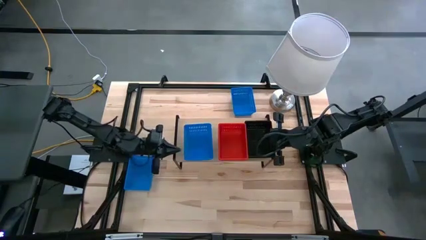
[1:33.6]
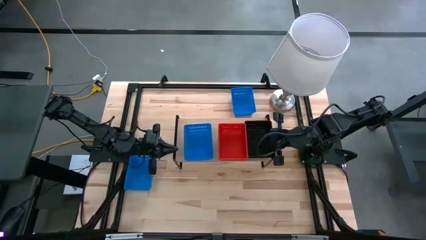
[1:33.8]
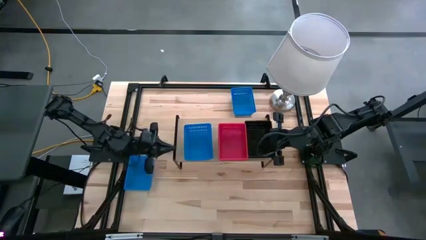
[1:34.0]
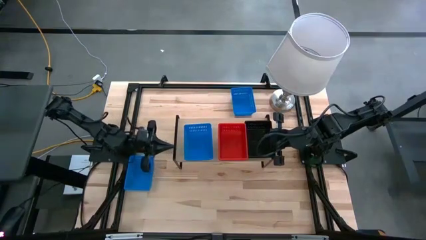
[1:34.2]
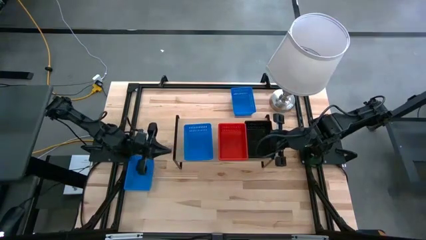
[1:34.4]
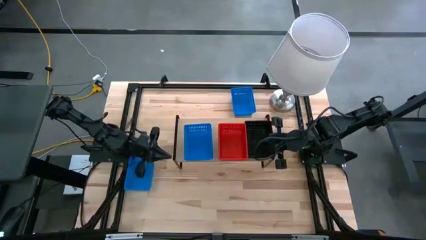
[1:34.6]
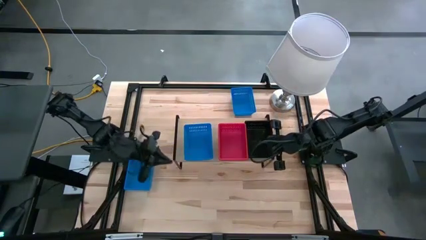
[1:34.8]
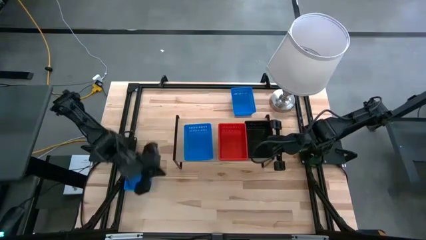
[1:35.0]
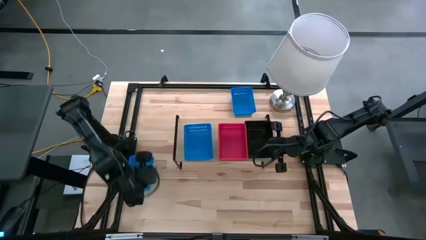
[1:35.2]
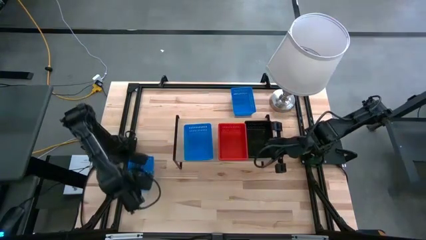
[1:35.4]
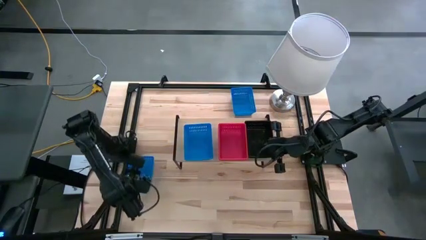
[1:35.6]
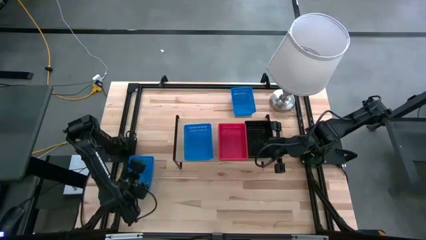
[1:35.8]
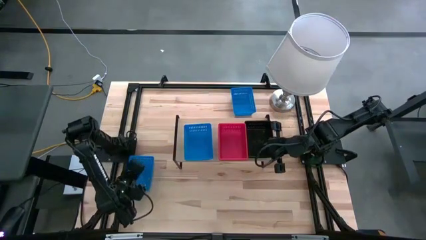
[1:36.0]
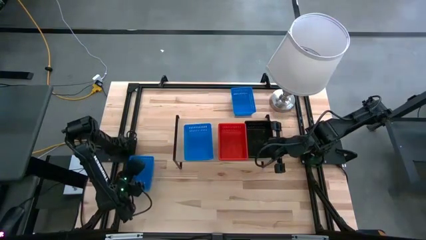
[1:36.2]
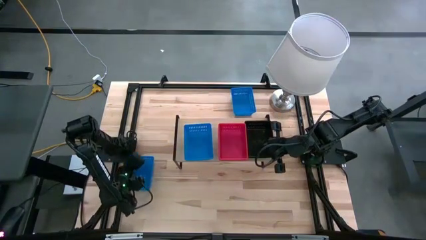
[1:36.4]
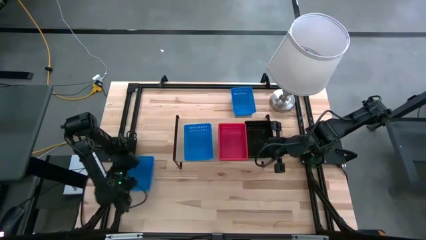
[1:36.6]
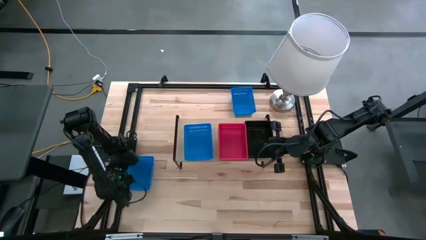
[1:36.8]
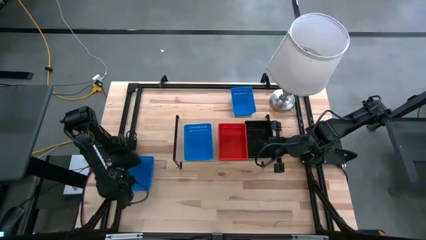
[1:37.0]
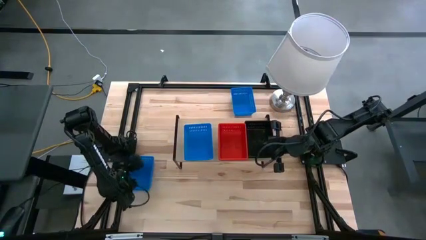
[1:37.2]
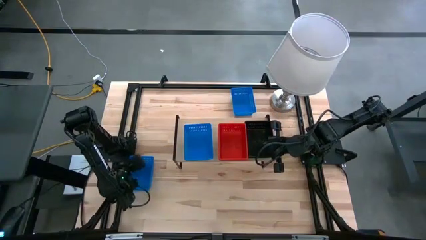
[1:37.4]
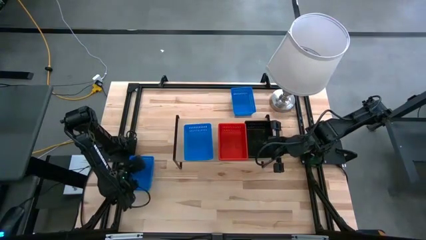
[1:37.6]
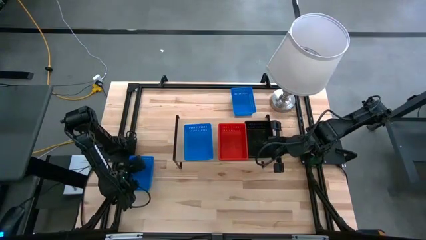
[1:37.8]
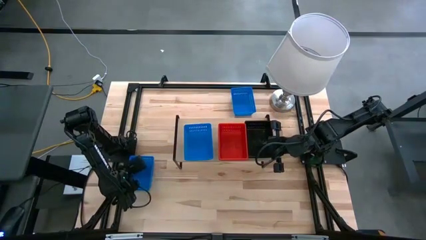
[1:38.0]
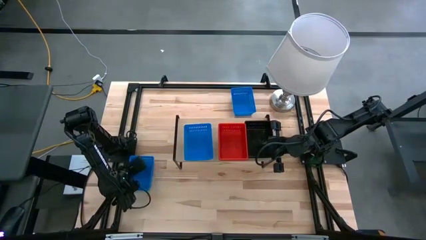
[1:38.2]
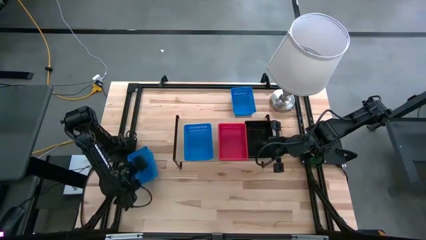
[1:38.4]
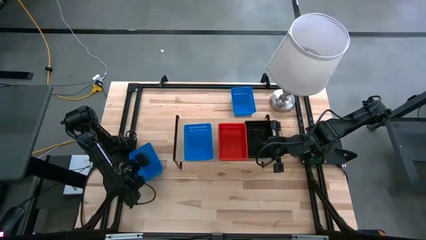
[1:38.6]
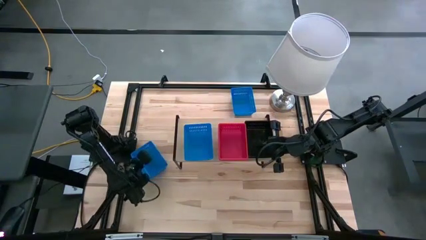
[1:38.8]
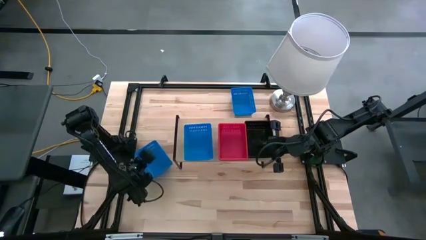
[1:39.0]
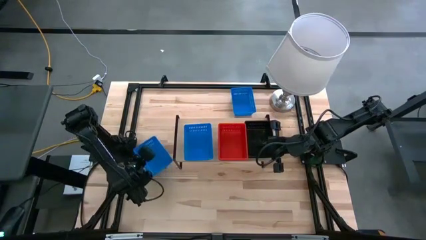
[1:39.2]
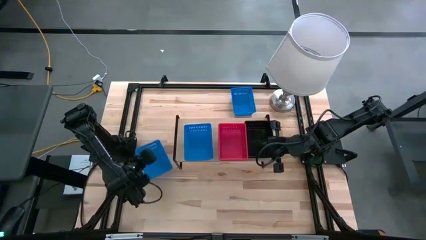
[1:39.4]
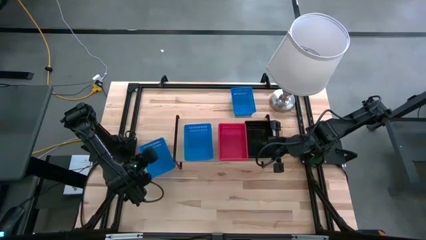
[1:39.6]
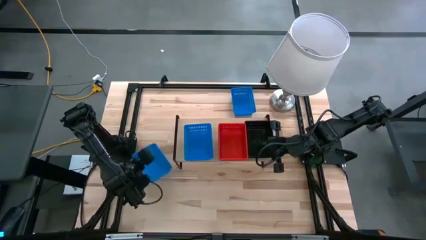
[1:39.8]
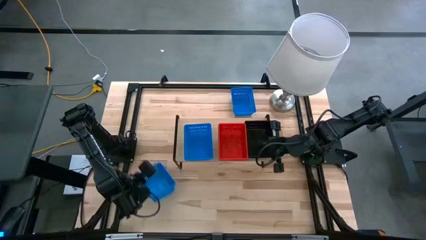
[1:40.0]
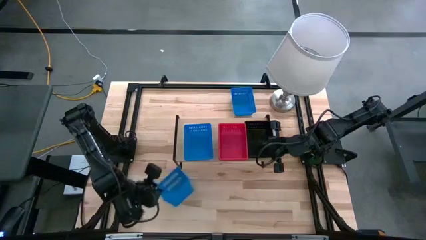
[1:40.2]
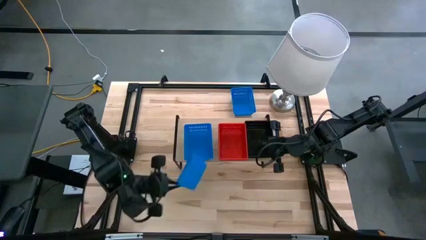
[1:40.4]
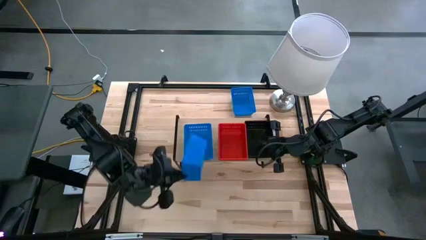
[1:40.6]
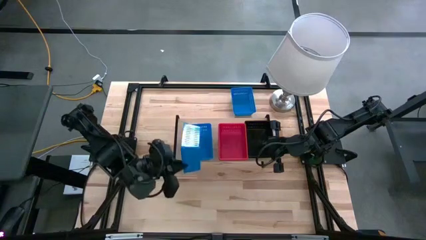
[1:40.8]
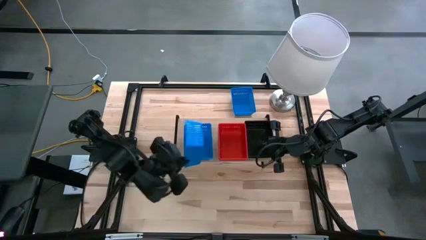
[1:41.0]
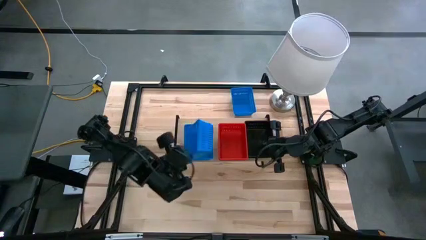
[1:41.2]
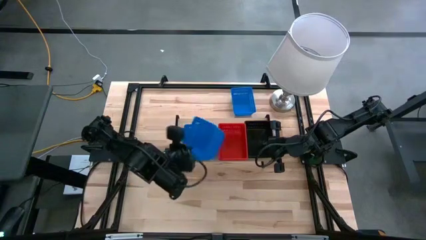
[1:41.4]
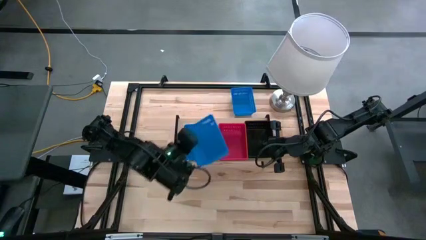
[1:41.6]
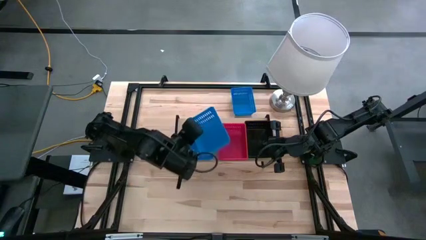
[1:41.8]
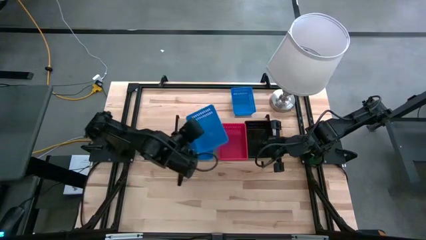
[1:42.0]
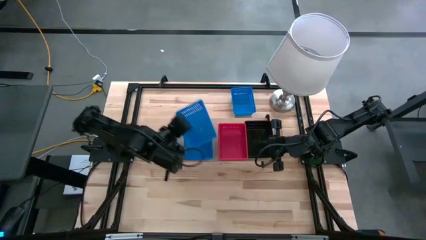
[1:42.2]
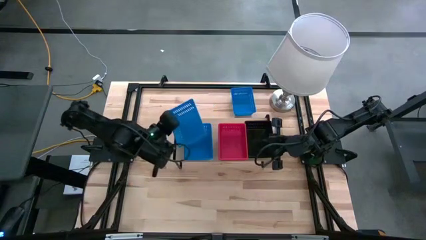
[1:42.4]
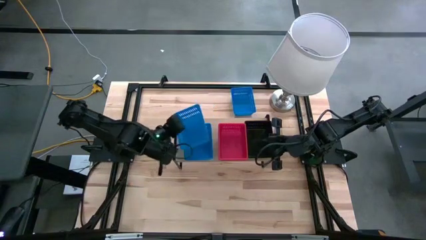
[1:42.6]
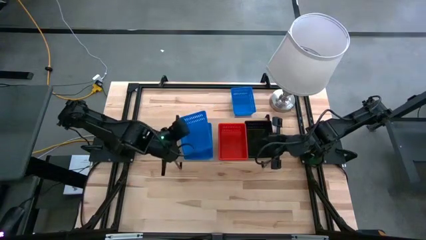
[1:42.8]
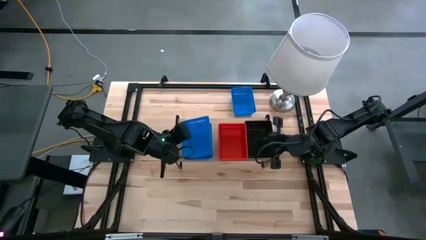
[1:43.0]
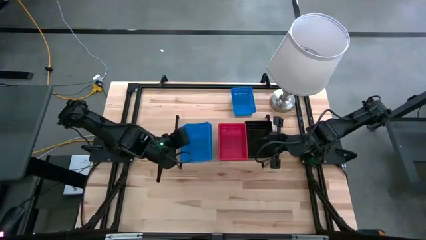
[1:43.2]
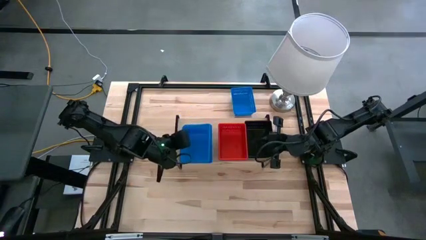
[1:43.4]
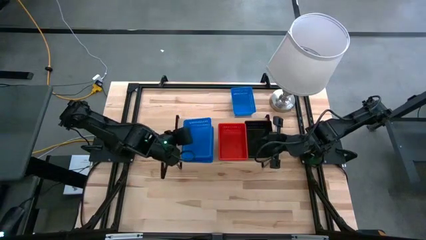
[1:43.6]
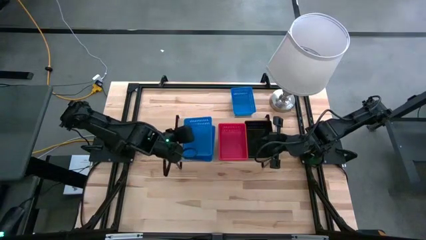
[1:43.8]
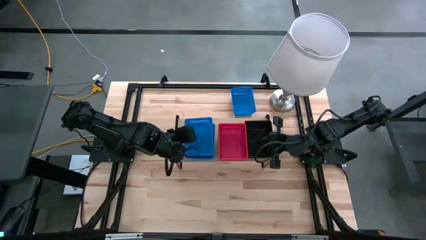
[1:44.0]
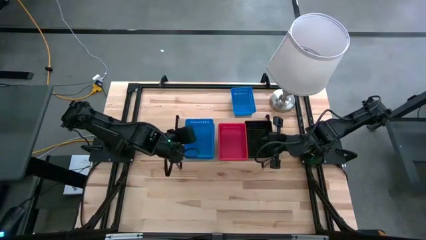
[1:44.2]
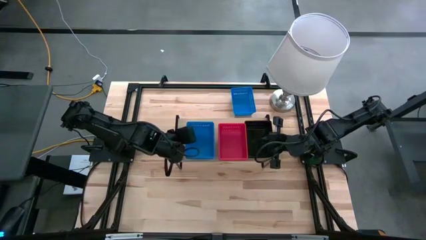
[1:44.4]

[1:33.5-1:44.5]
Task: Stack baskets on shelf by color
Stack the left blue bin on the blue bin on the shelf

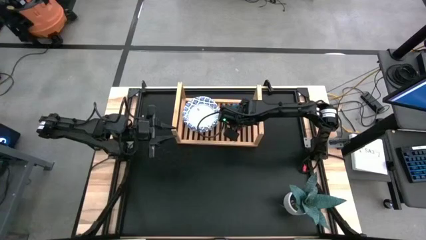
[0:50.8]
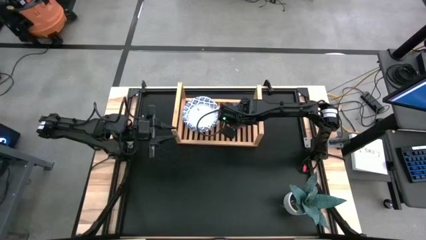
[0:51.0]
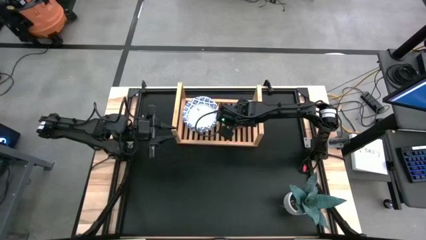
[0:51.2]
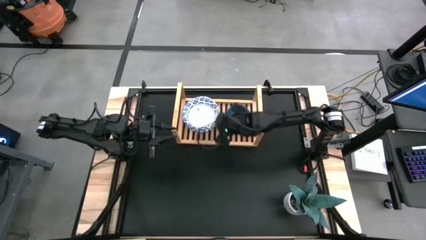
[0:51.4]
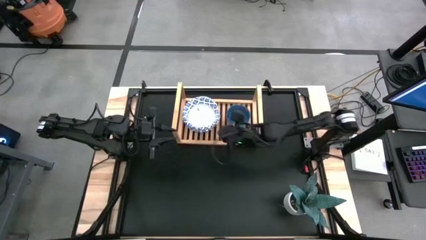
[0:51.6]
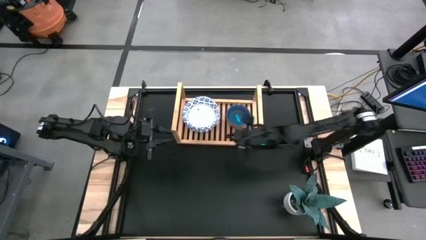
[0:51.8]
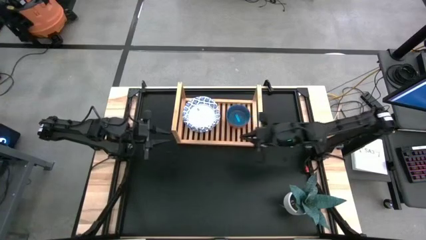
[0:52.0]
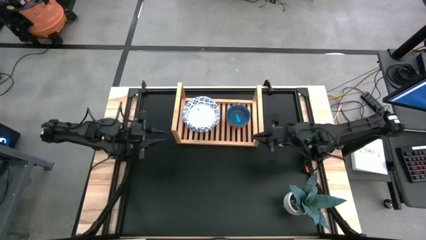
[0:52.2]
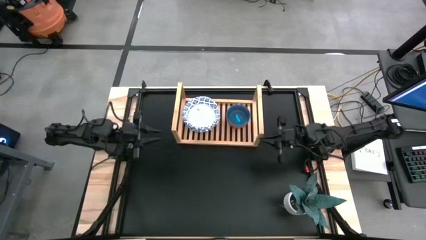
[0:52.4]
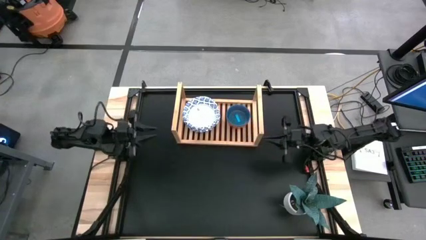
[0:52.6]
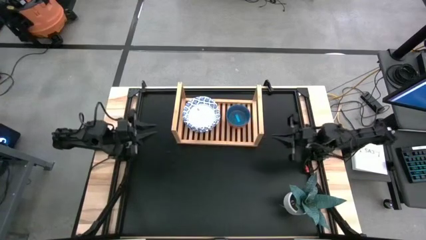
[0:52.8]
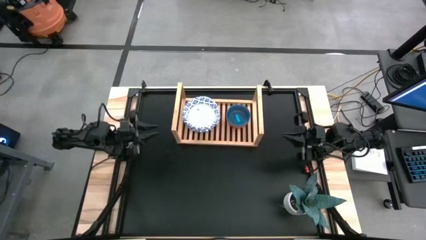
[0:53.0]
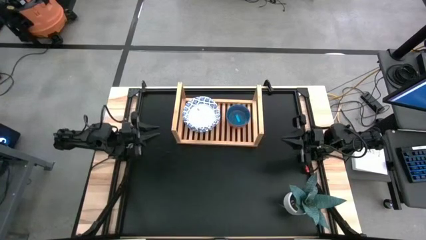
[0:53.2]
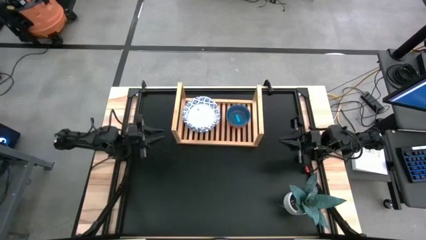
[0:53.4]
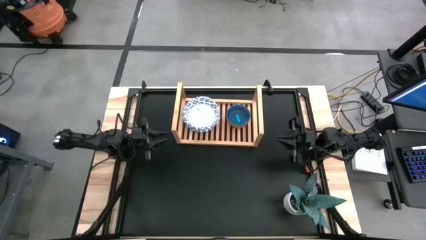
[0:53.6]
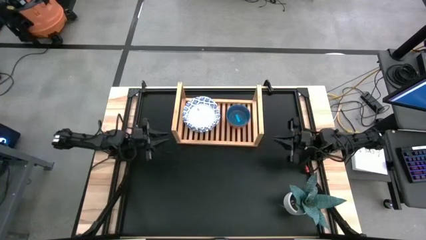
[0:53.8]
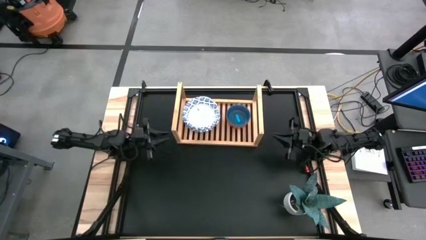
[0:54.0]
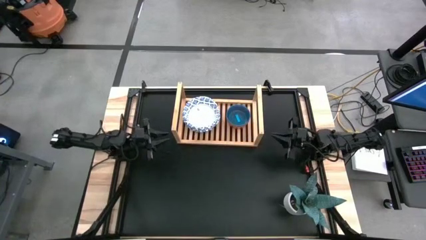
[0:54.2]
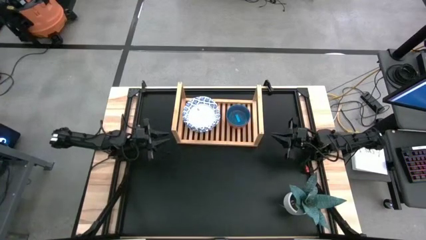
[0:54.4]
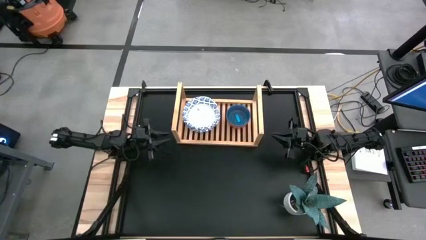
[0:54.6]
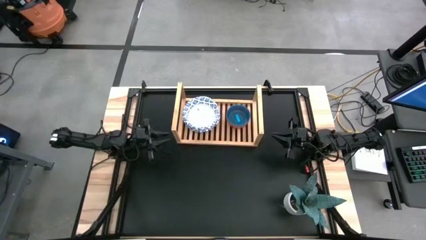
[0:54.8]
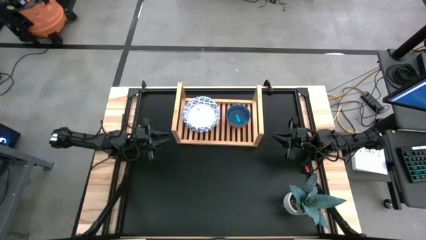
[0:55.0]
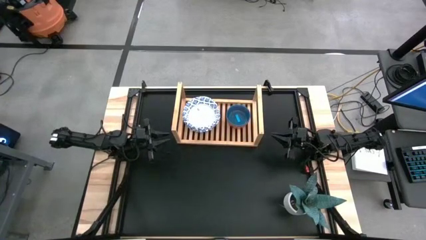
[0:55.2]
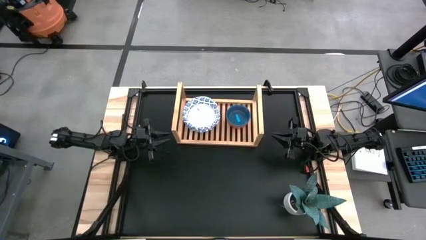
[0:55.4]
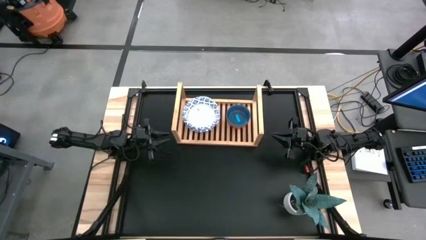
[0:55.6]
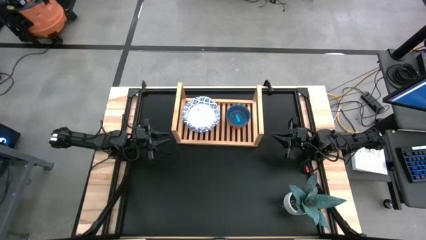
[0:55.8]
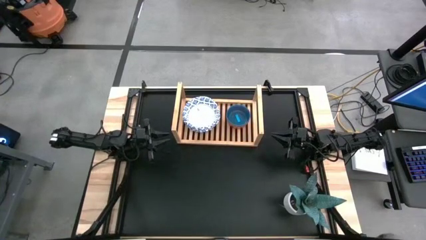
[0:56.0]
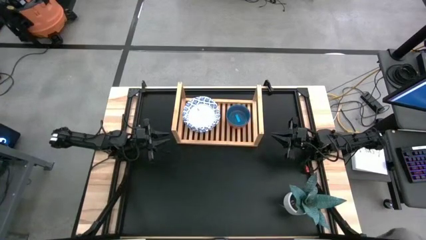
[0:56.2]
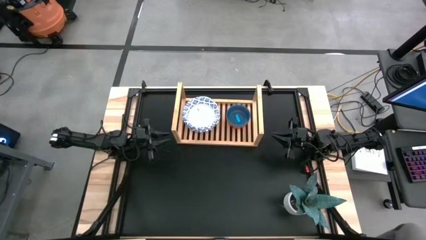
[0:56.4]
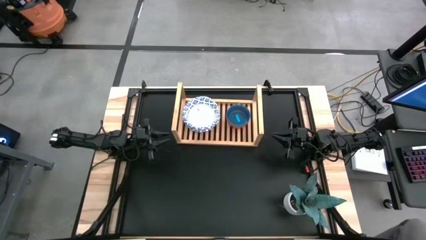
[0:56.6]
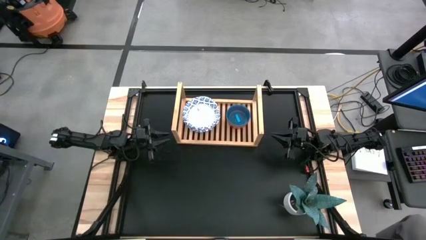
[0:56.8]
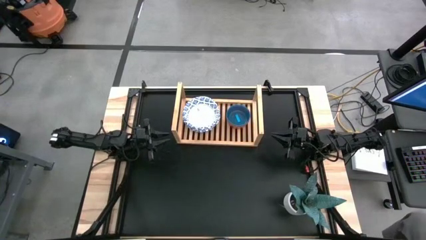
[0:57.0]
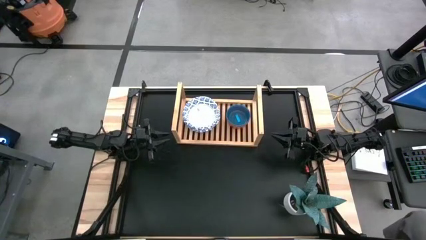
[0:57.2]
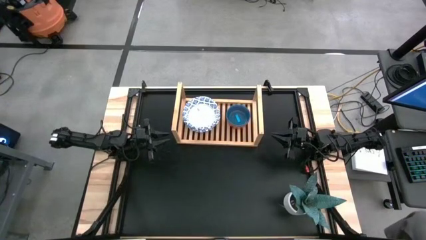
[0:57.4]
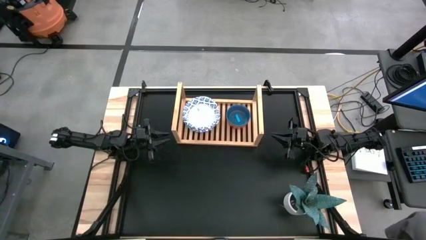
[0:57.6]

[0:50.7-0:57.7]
Task: Place and stack bowls onto a shelf
Return to Home Position
